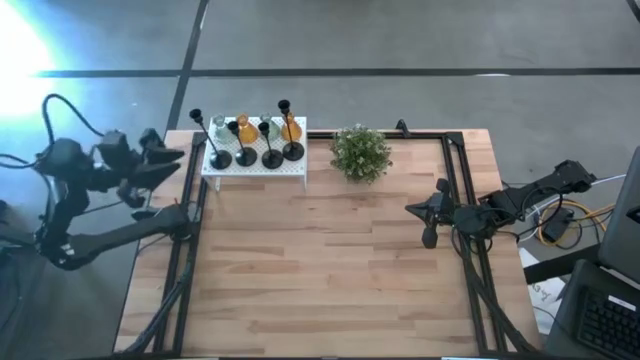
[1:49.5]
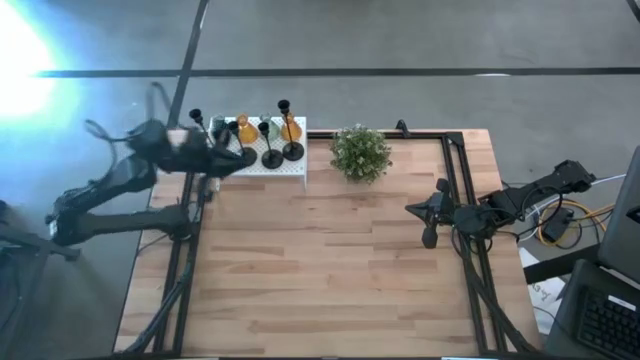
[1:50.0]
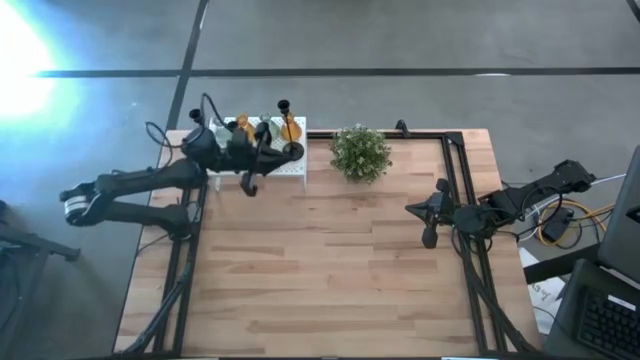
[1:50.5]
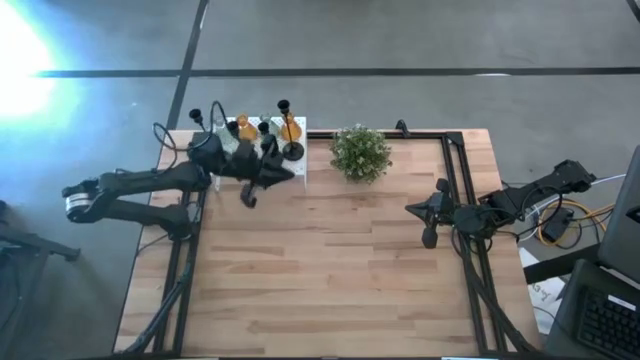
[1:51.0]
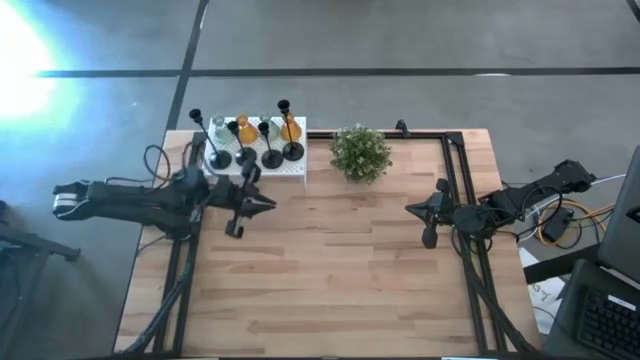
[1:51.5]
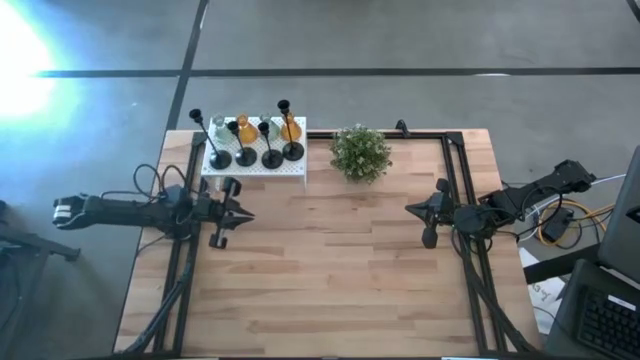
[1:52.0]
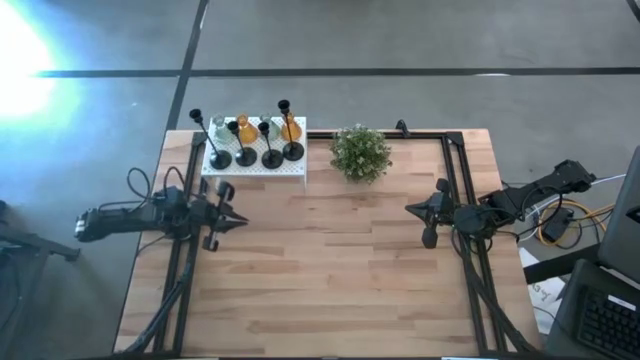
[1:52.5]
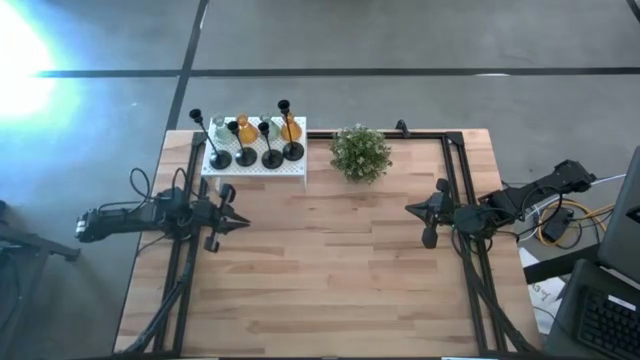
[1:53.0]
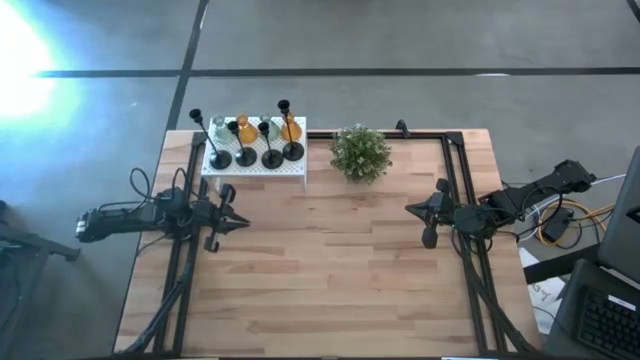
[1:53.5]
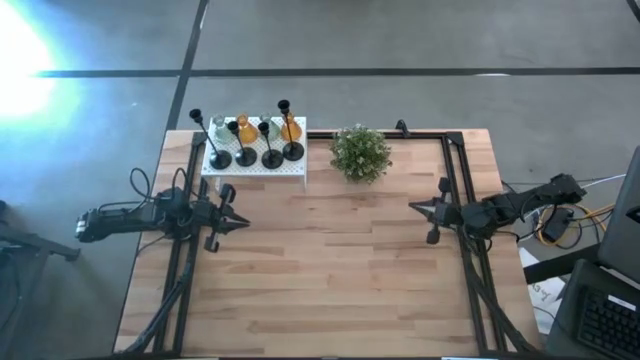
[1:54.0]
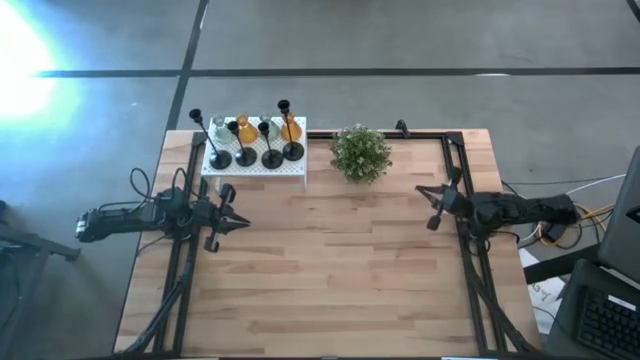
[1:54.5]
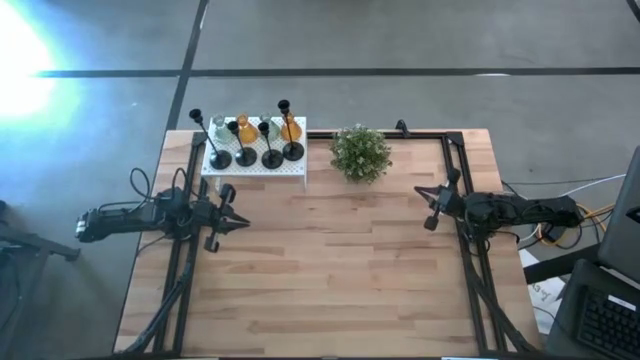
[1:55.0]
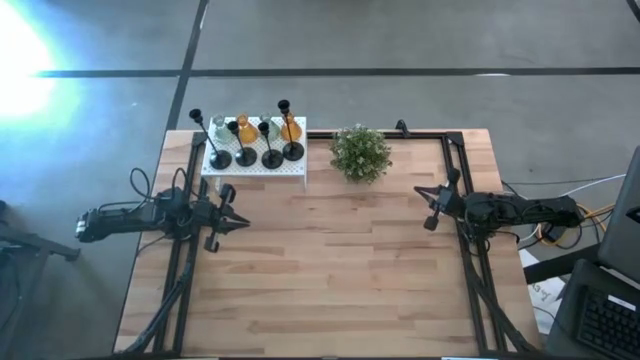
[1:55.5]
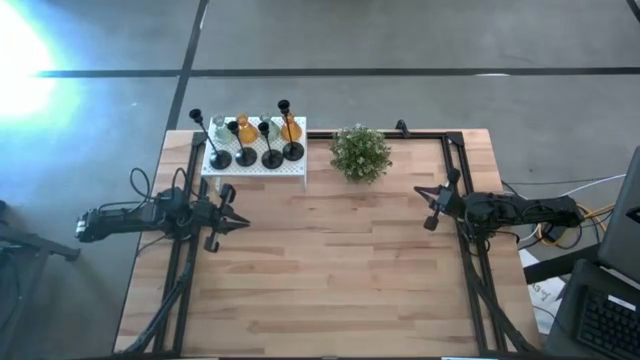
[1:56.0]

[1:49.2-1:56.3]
Task: Pick & Place candle stick holders
Return to Home Position

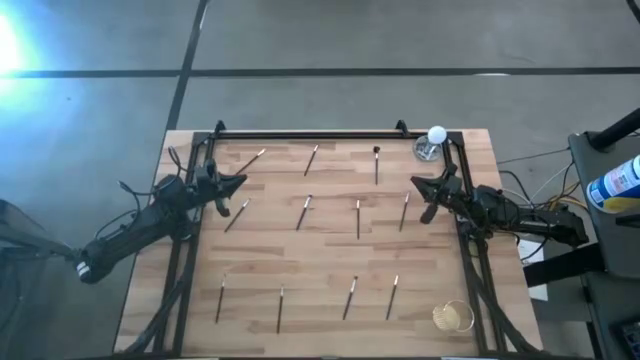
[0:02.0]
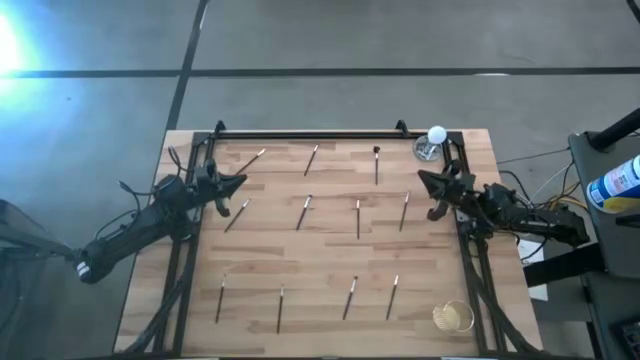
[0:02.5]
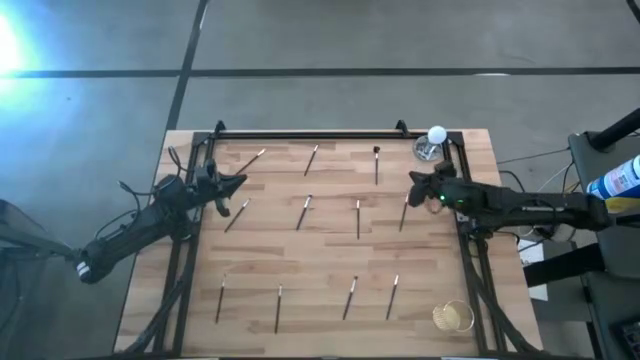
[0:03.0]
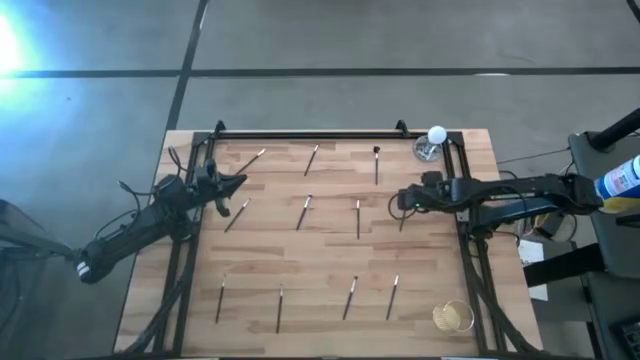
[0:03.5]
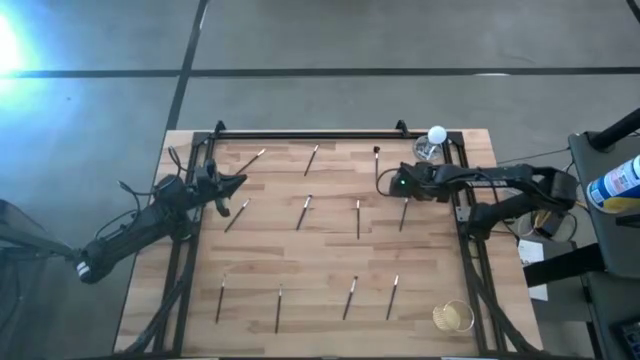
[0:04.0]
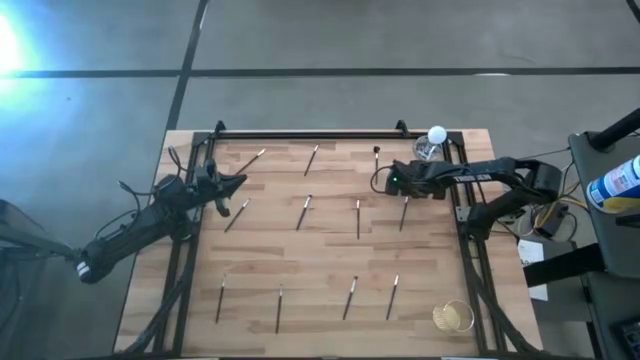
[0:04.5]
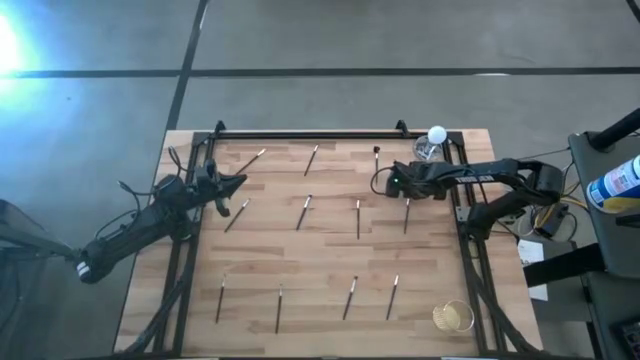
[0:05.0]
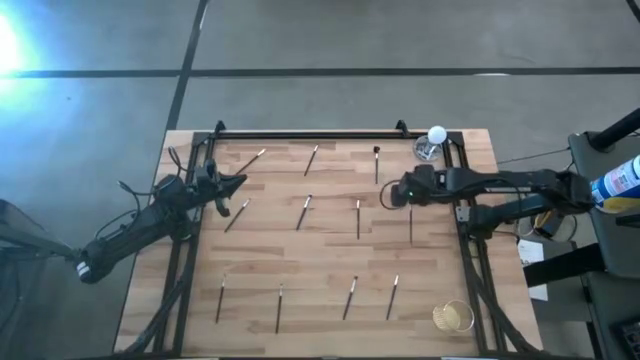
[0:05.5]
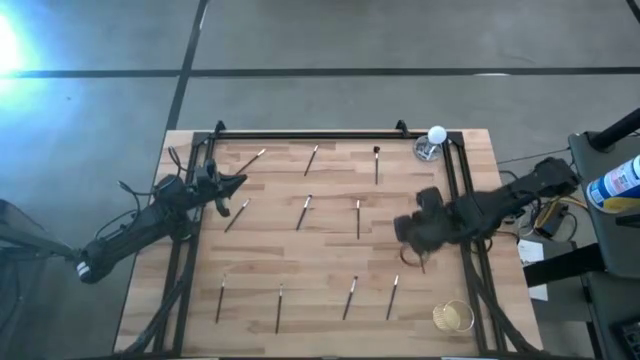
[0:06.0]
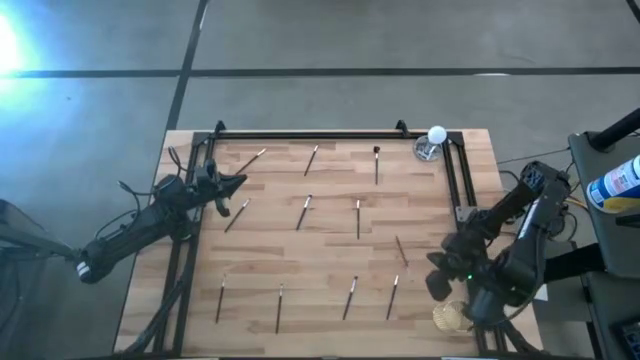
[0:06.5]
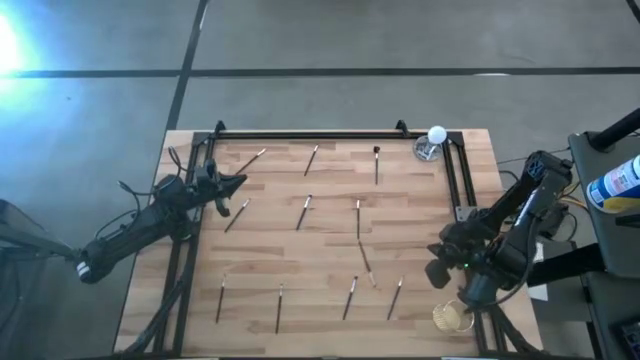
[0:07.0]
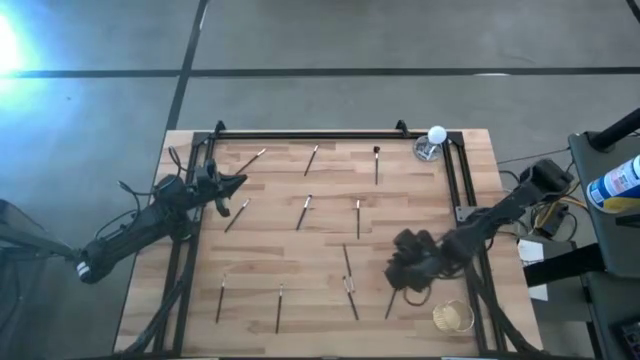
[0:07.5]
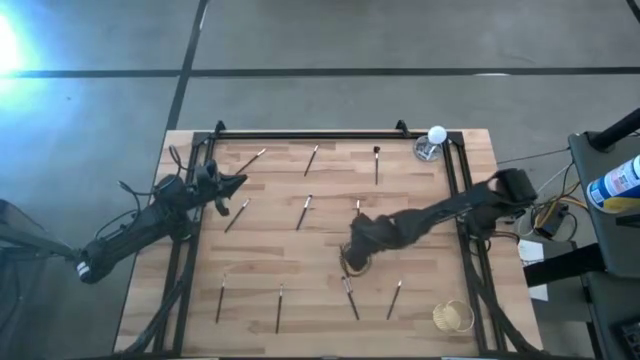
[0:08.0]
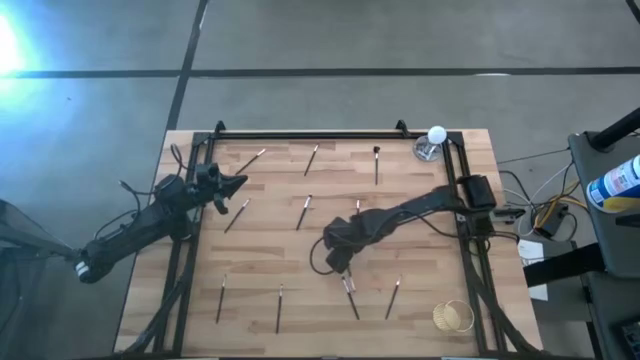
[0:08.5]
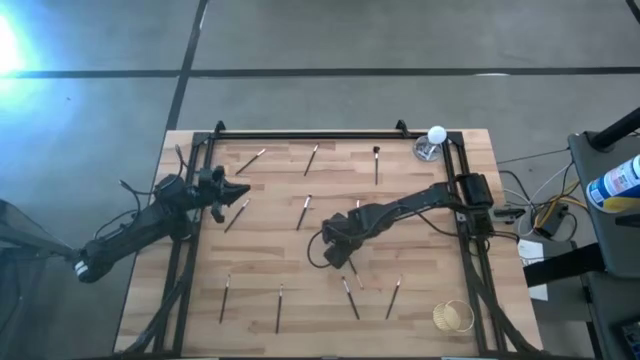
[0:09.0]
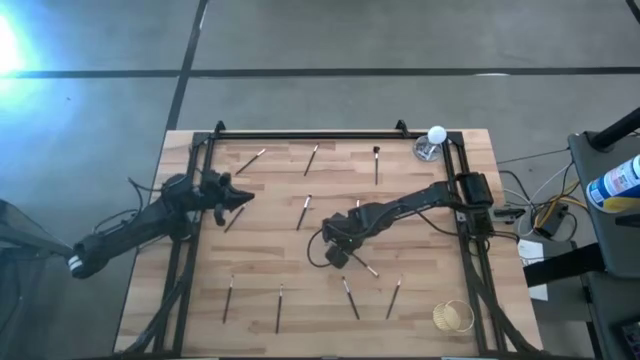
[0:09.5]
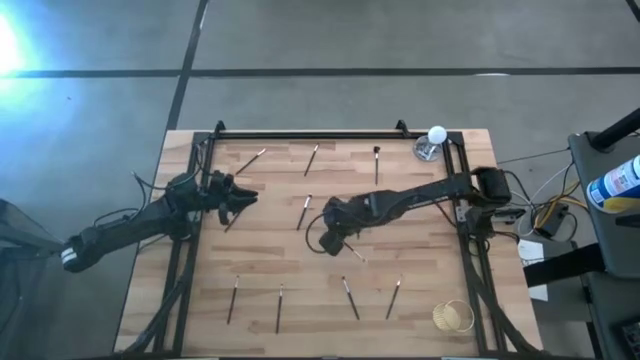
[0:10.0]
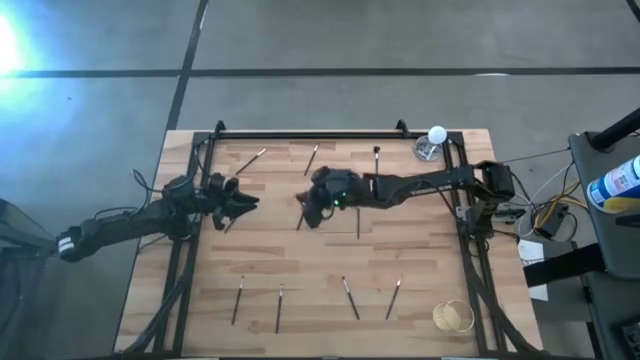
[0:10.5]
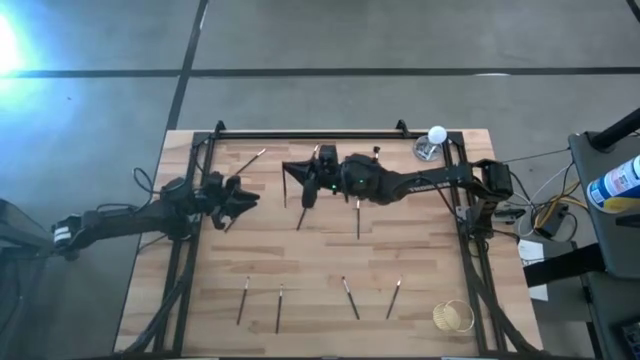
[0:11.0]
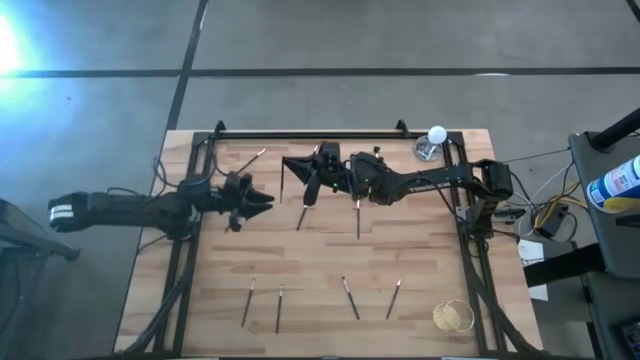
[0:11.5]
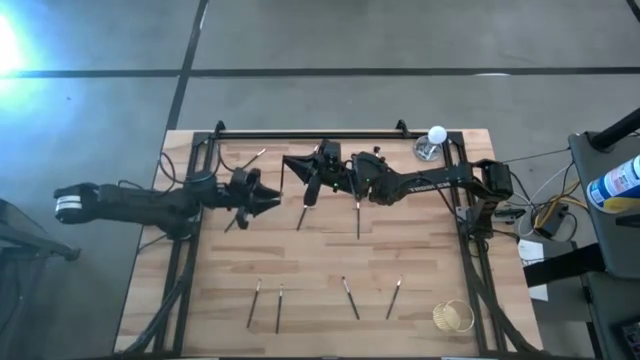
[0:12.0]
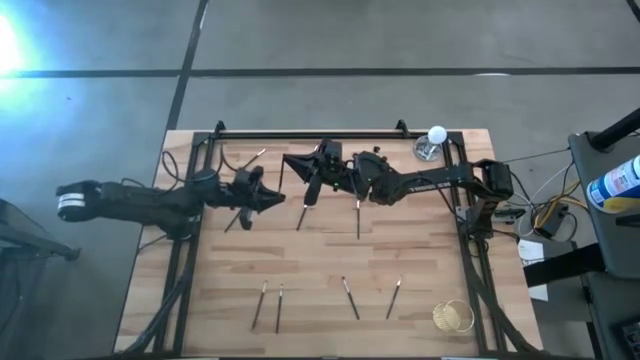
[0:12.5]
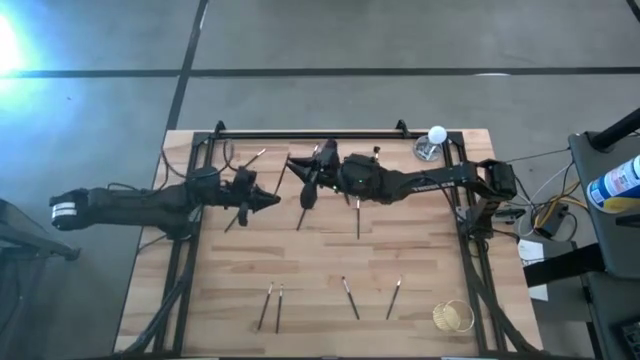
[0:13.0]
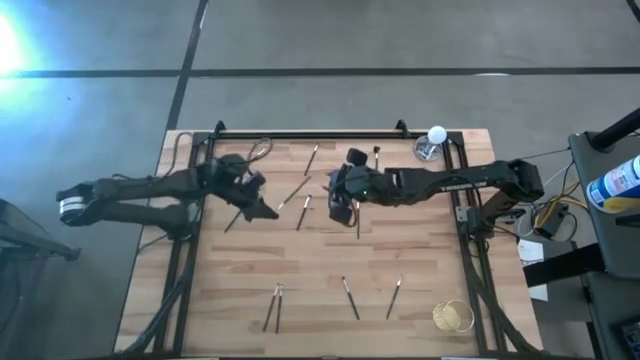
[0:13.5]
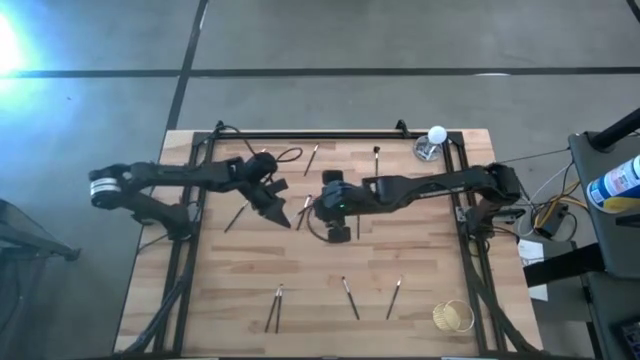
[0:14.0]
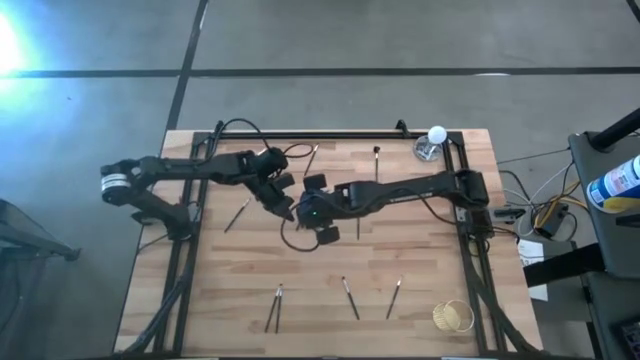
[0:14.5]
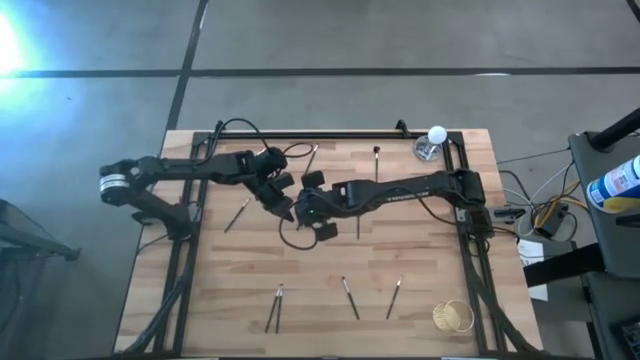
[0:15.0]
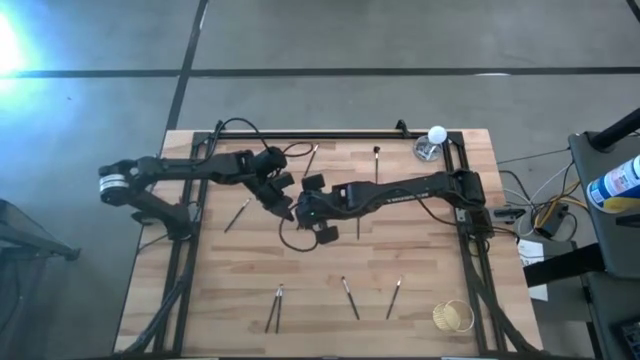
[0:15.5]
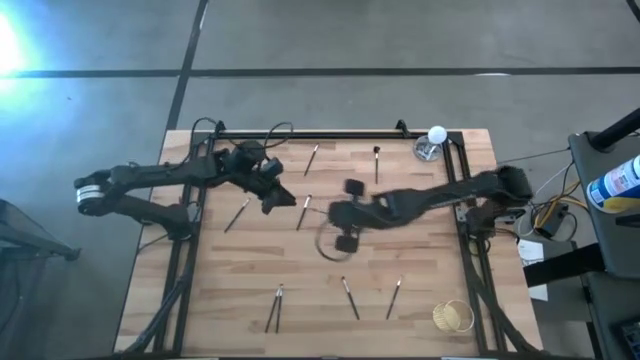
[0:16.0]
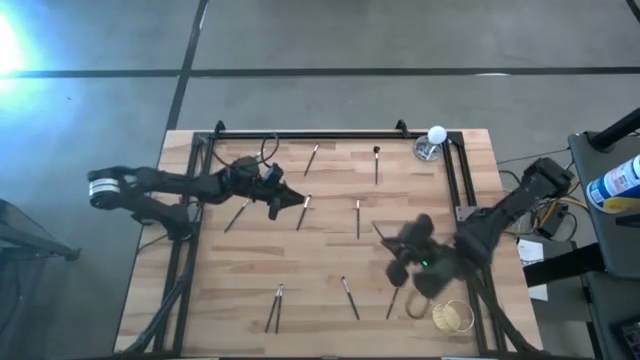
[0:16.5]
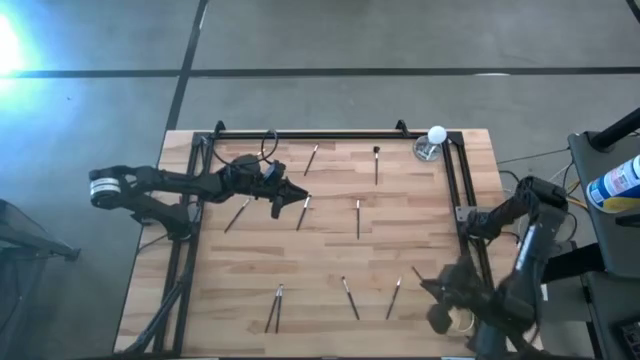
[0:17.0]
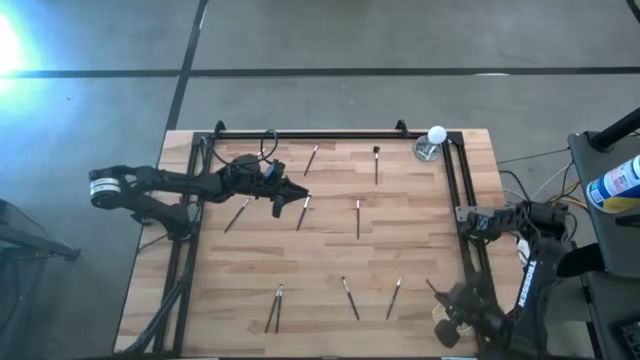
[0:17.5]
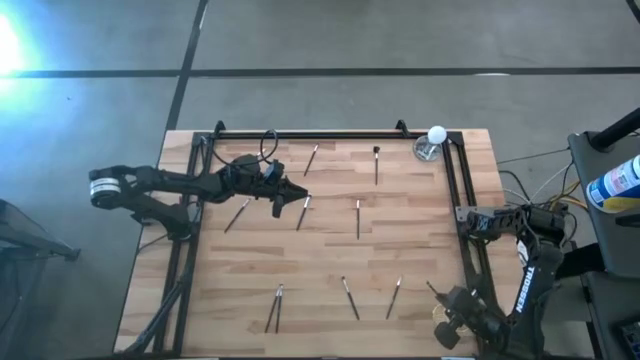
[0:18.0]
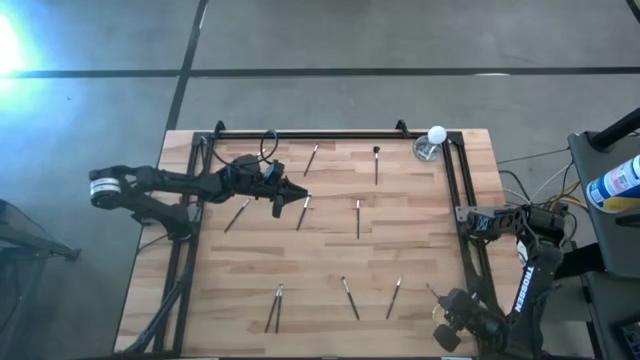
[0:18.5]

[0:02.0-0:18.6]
Task: Pick & Place Makeup Brushes
Put the eyeshadow brush into the makeup brush holder
